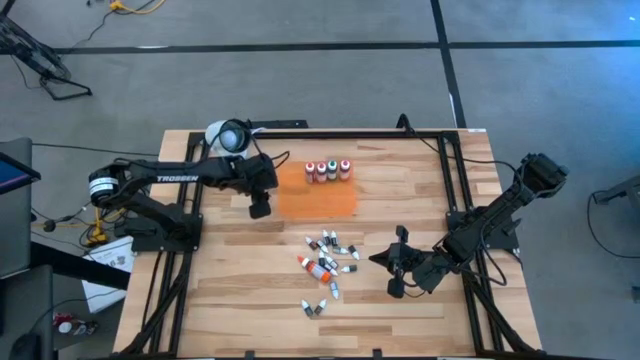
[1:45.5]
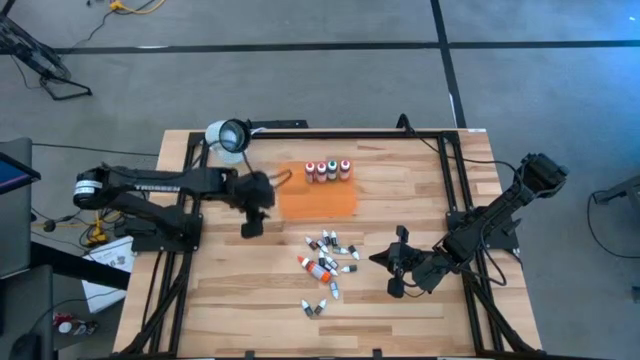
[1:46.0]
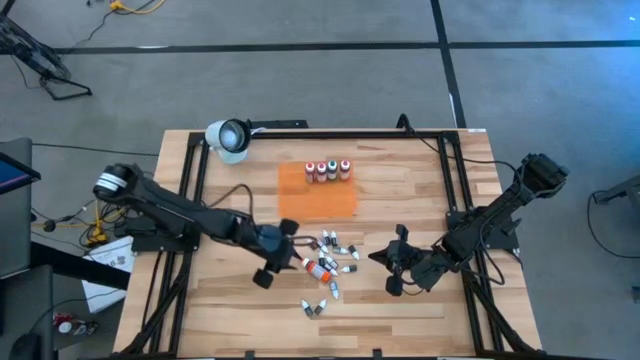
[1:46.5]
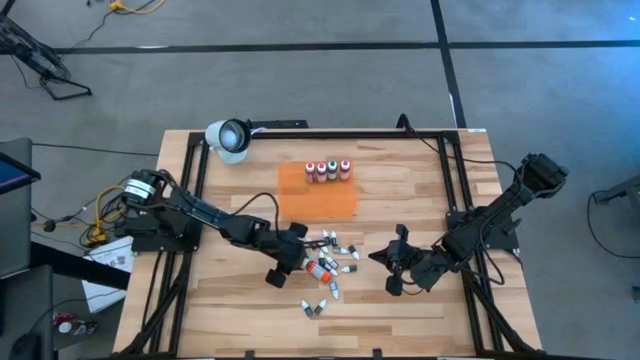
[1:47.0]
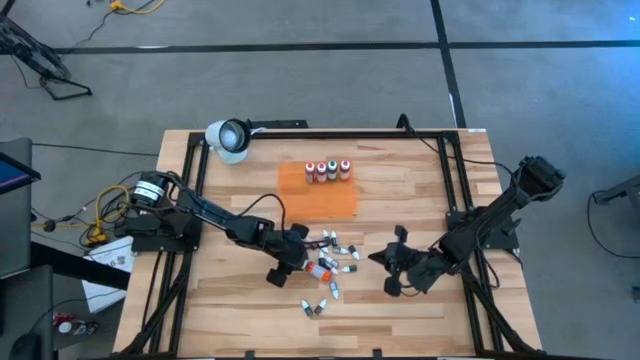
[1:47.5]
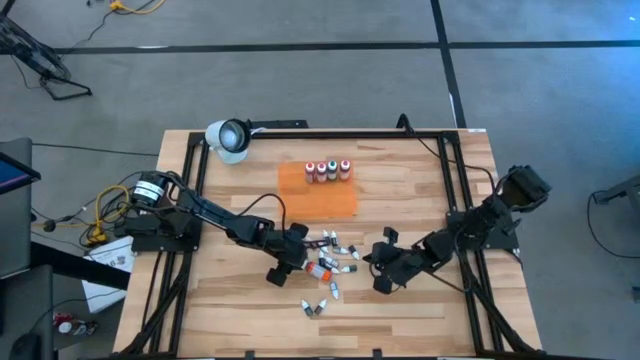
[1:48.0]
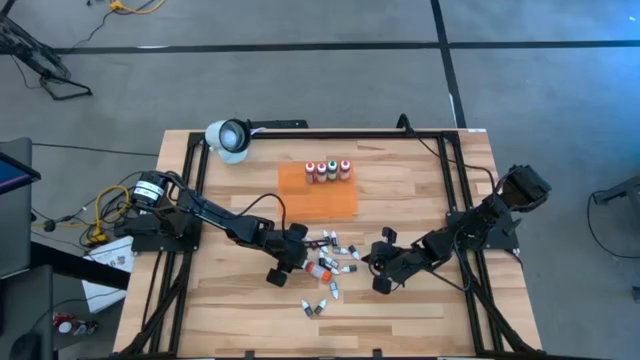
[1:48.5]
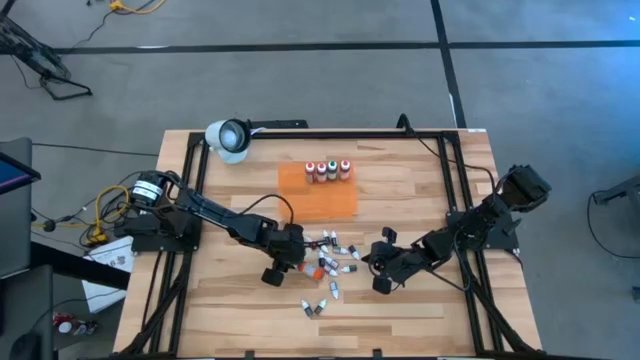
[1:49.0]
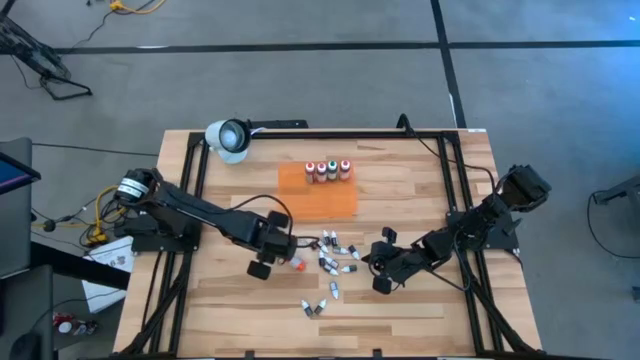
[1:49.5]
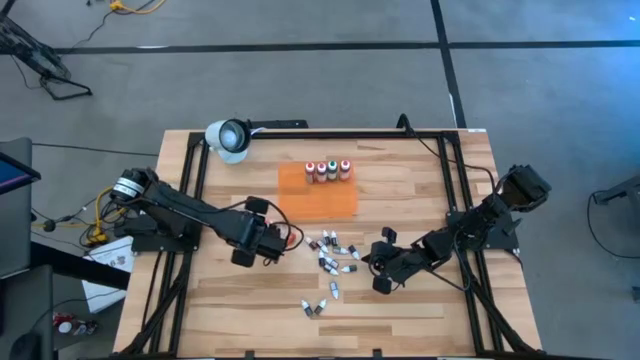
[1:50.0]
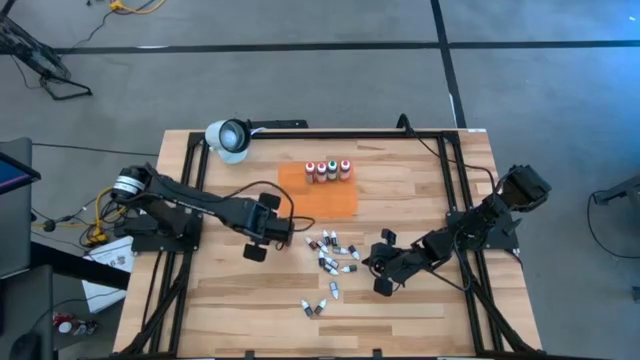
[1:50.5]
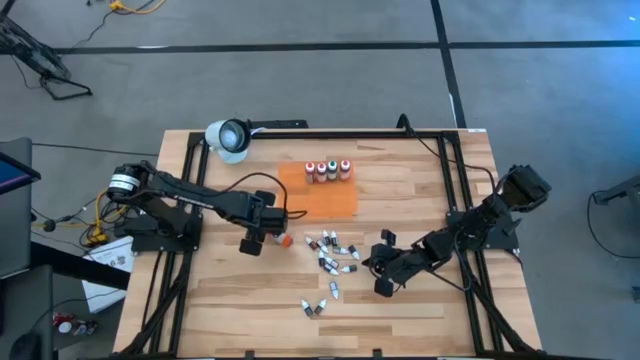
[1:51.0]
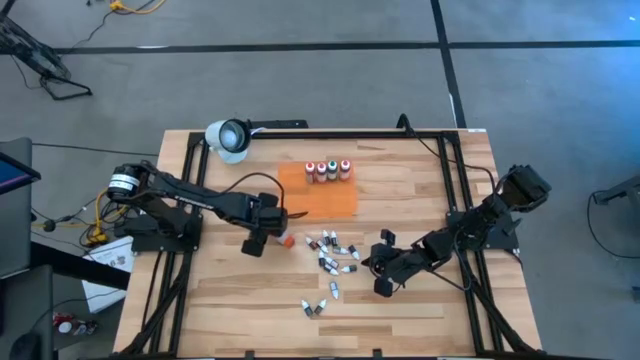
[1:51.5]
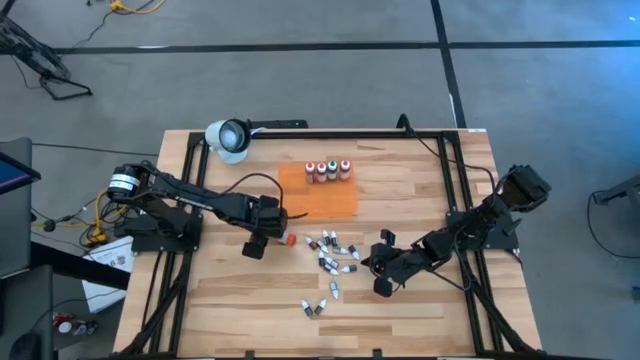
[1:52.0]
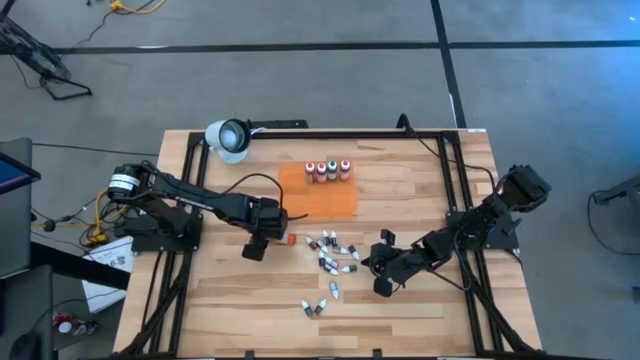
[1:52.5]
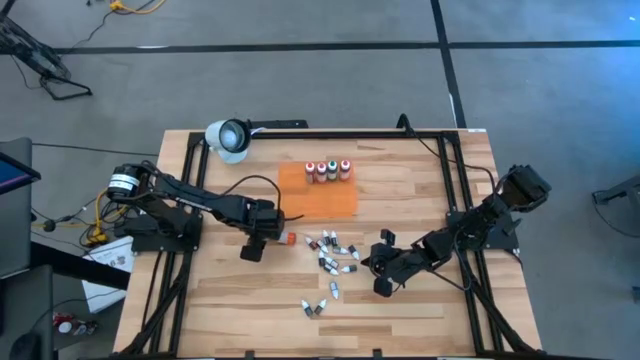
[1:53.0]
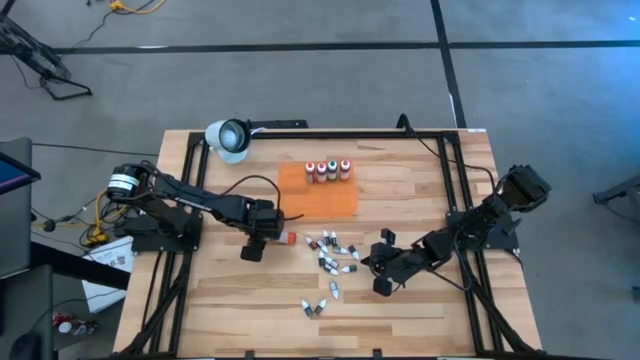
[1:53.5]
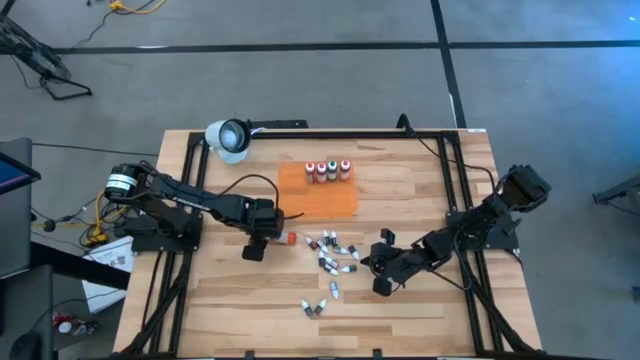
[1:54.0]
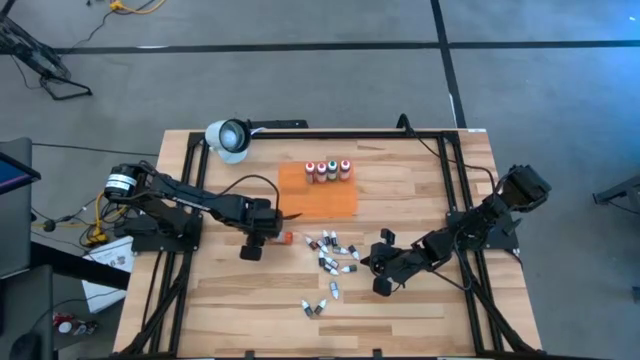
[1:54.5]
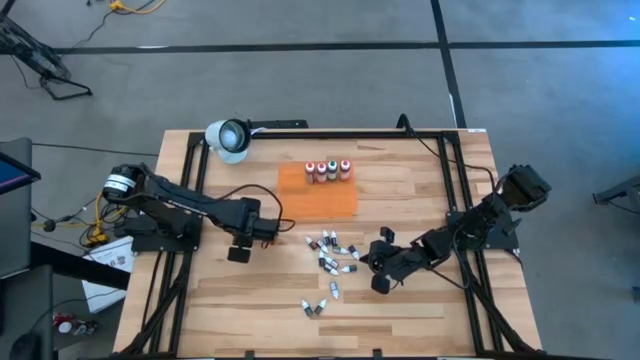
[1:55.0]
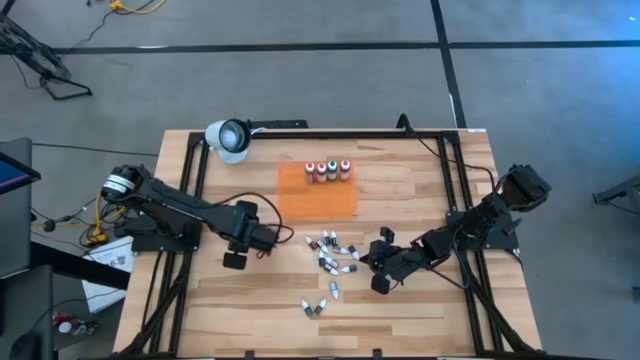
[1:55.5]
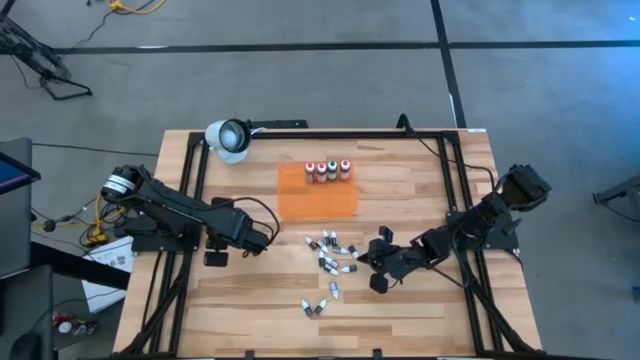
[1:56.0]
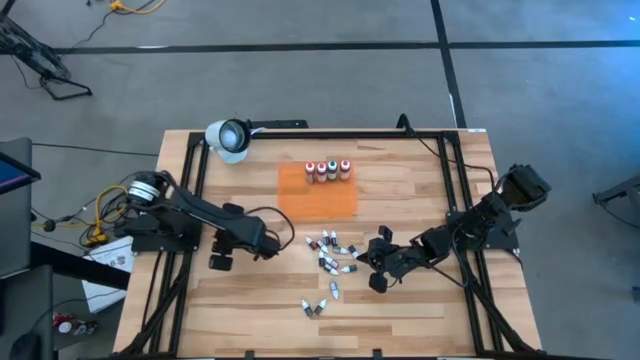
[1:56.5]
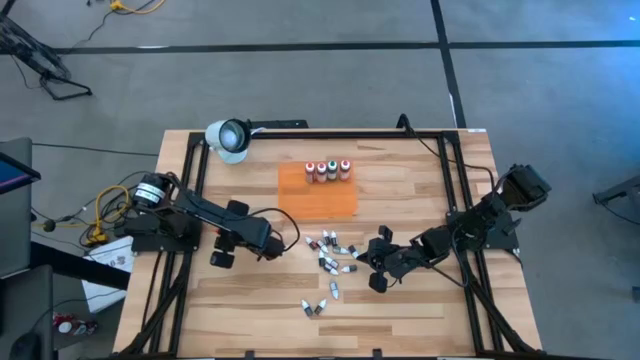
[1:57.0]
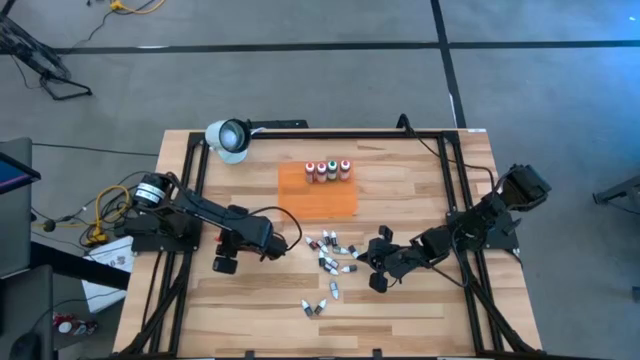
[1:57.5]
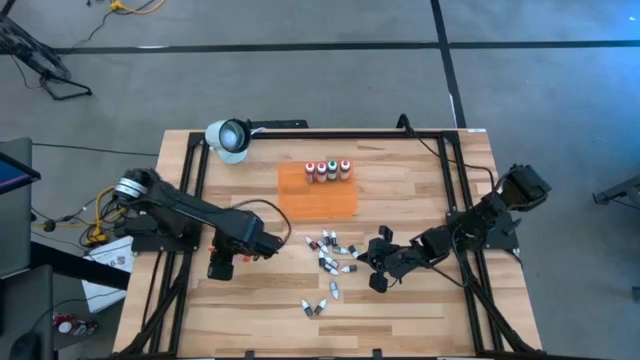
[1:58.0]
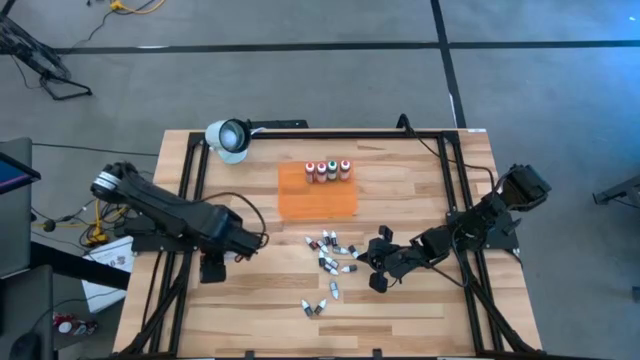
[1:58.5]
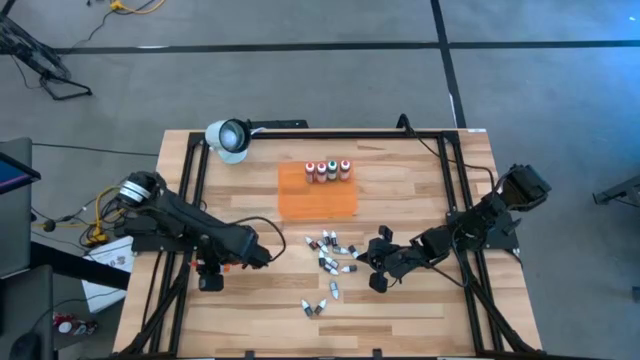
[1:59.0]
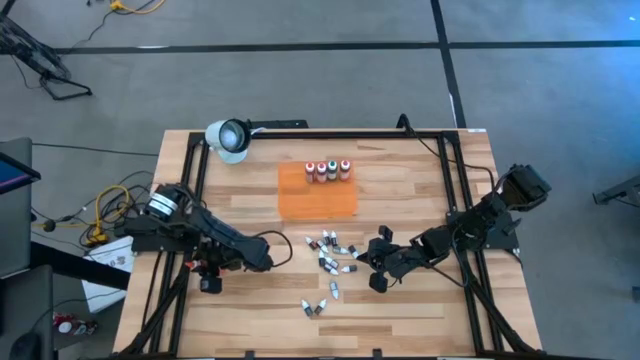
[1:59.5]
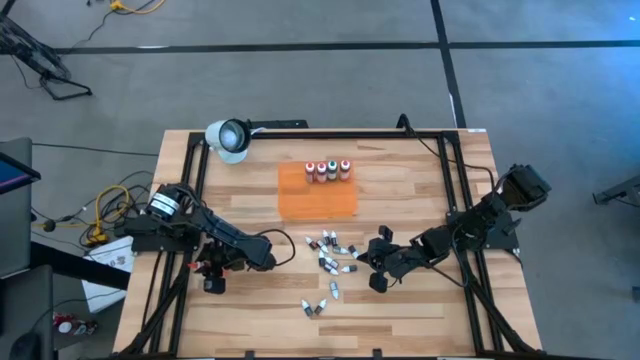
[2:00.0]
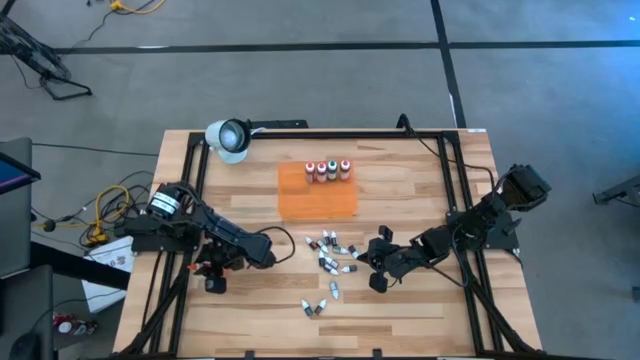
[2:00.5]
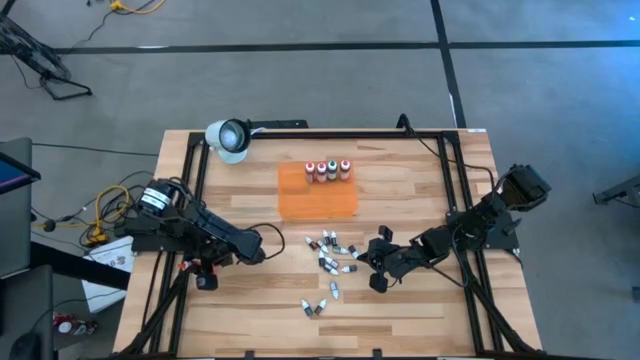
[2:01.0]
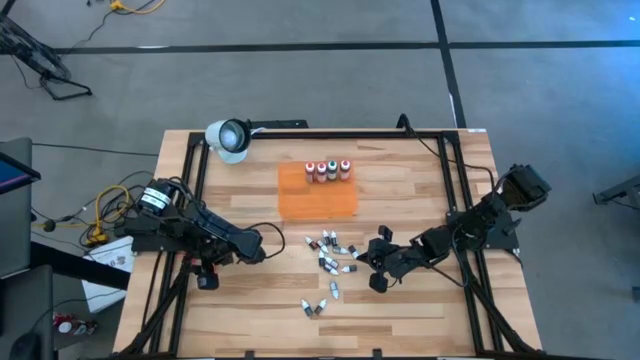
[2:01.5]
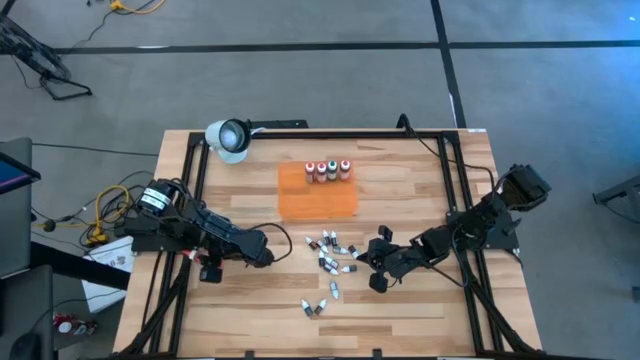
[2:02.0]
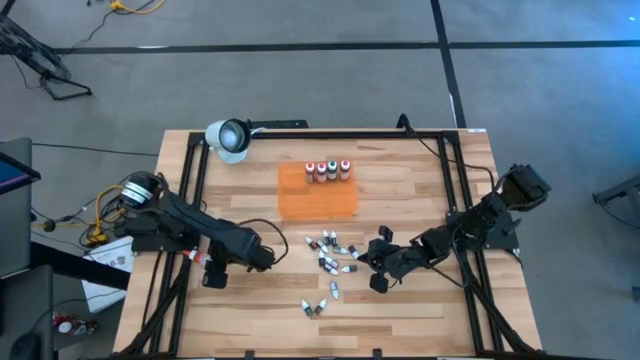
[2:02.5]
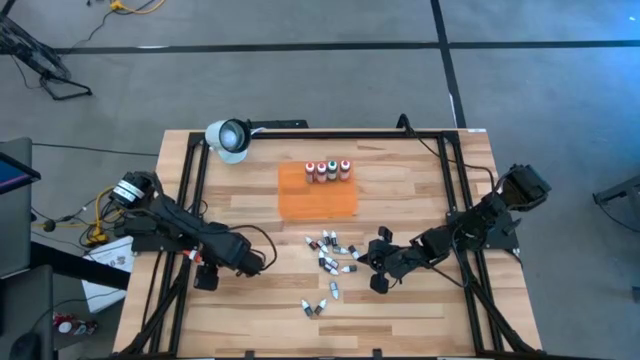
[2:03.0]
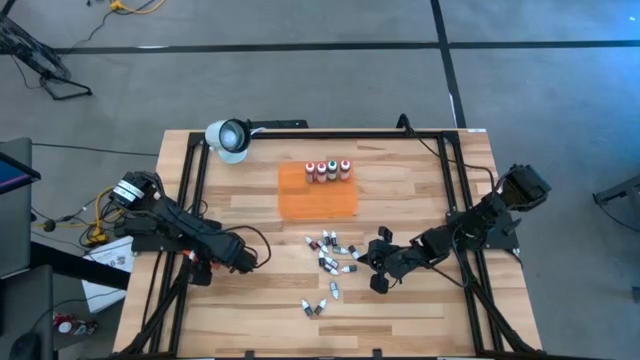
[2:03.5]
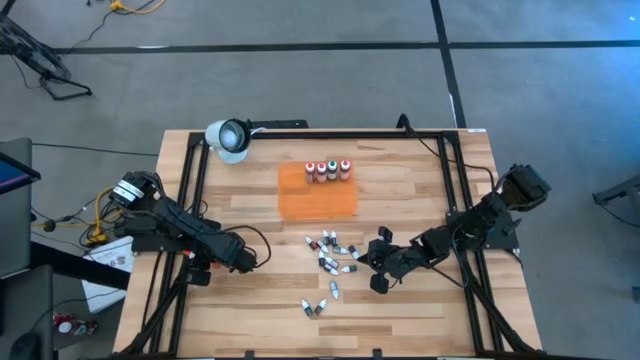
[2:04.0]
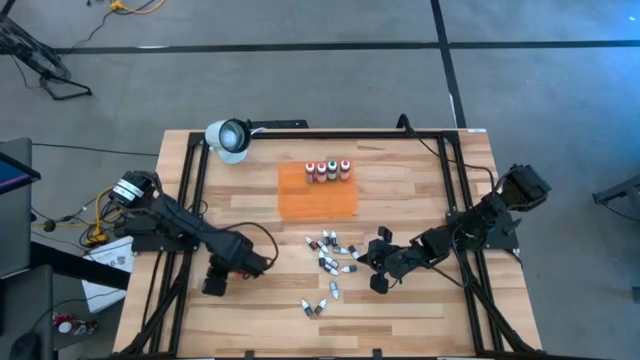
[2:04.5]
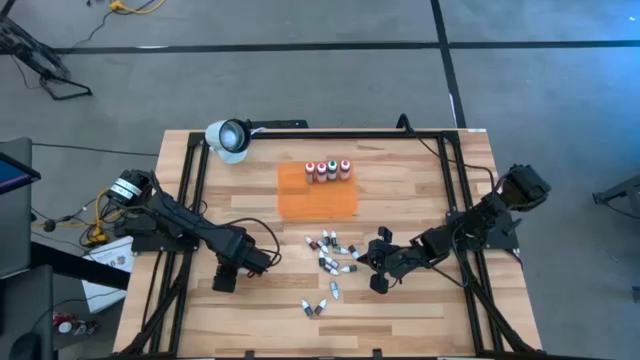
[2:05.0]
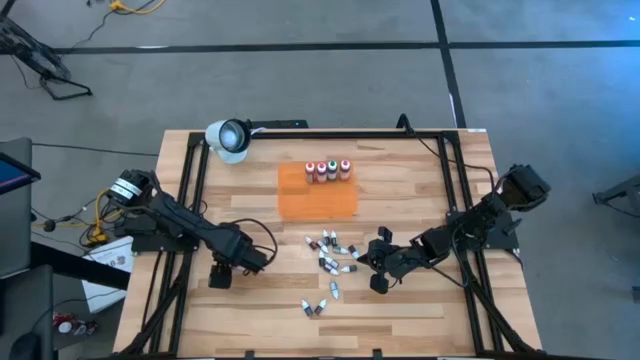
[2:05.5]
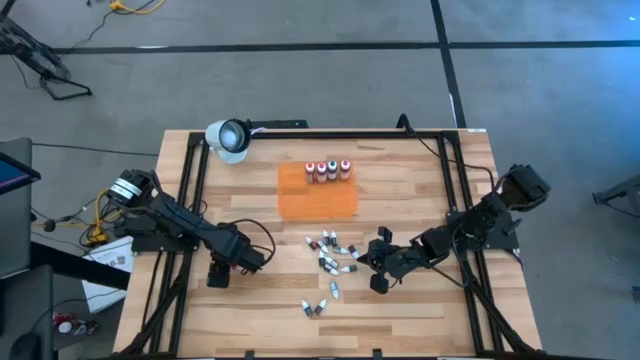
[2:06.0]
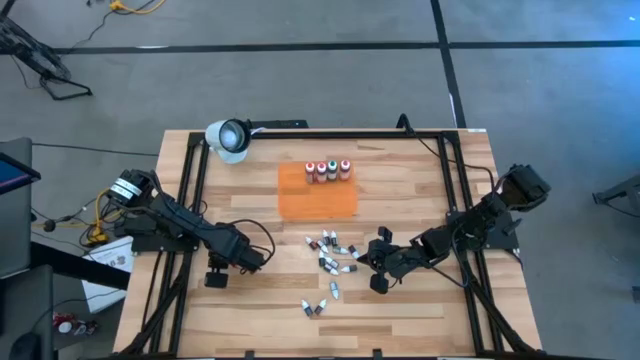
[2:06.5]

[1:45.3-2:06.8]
Task: Pick & Place food coloring
Put the big orange food coloring bottle into the orange bin
